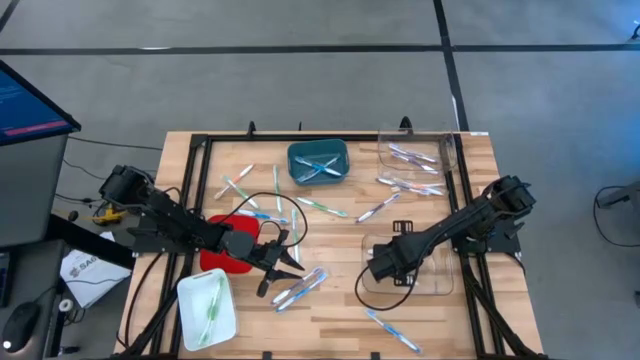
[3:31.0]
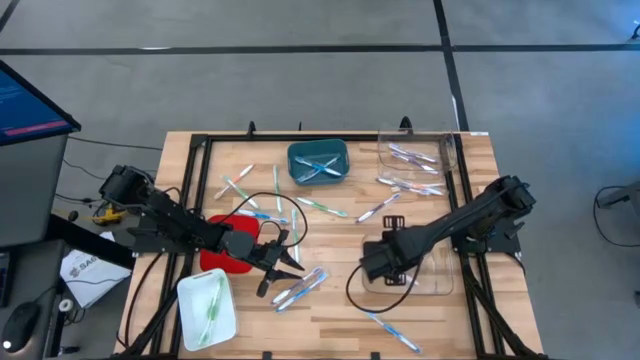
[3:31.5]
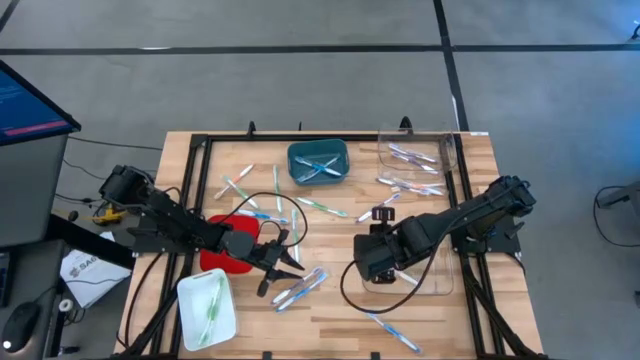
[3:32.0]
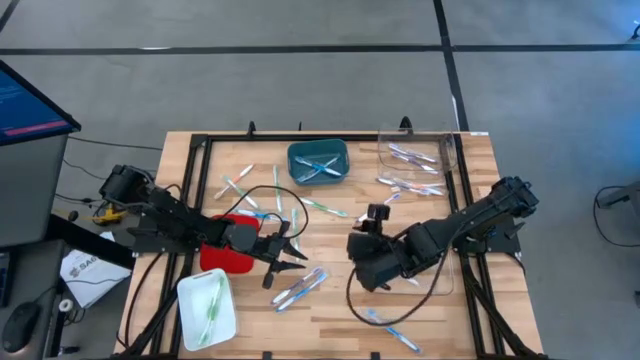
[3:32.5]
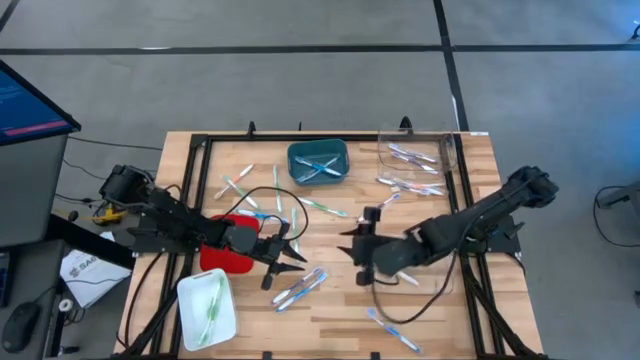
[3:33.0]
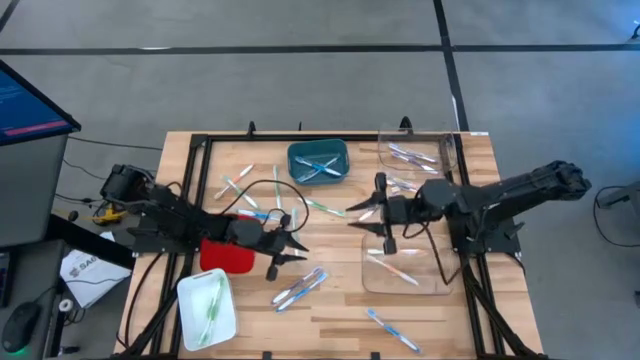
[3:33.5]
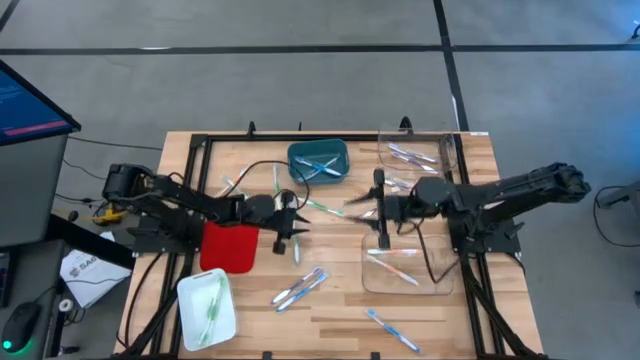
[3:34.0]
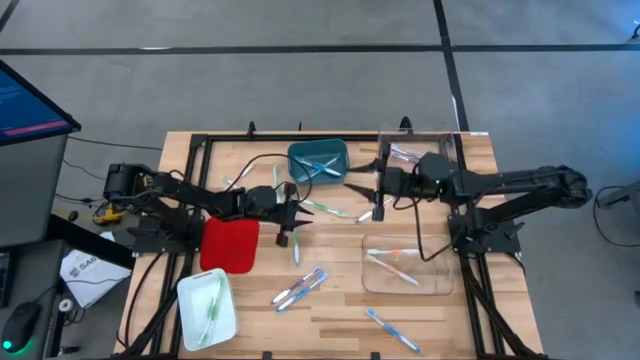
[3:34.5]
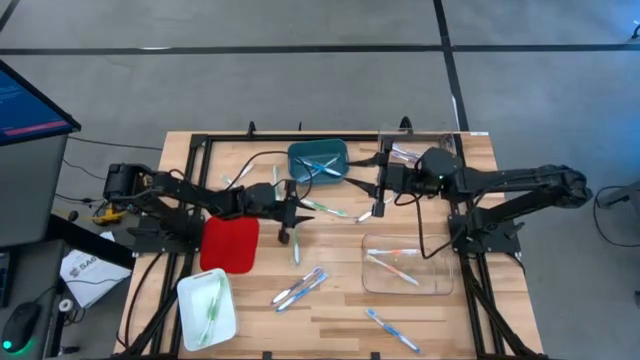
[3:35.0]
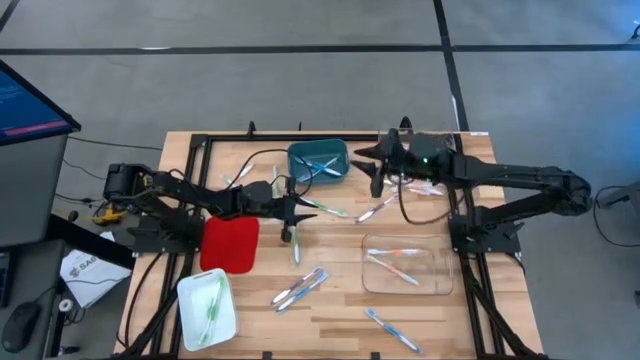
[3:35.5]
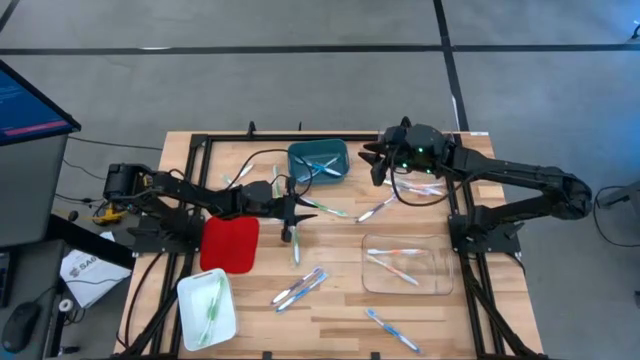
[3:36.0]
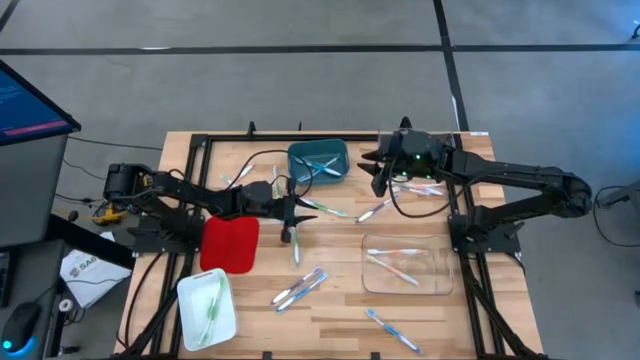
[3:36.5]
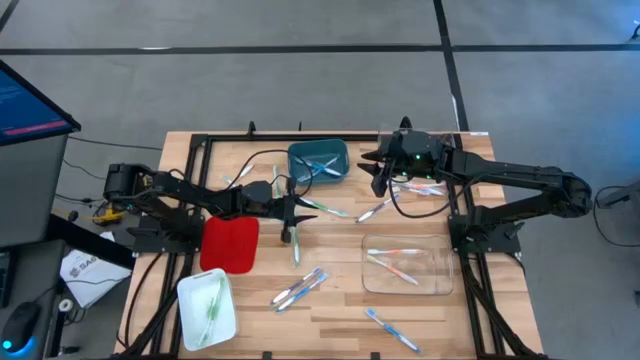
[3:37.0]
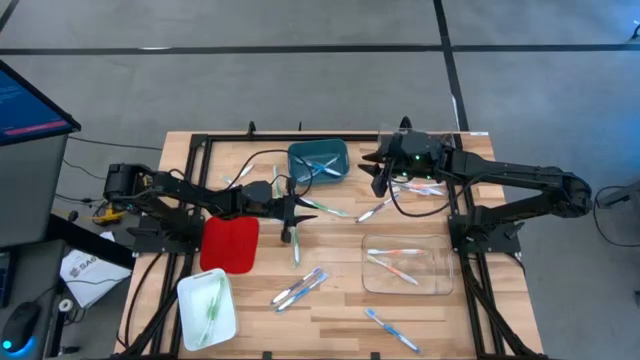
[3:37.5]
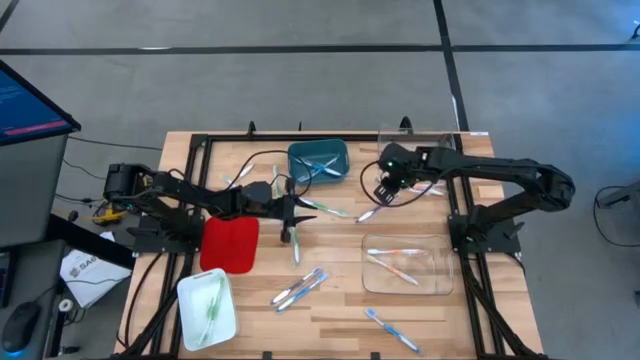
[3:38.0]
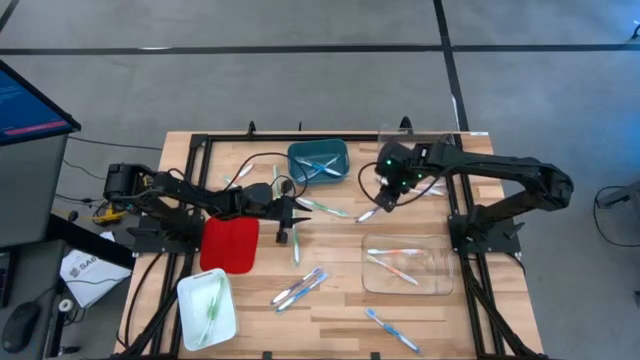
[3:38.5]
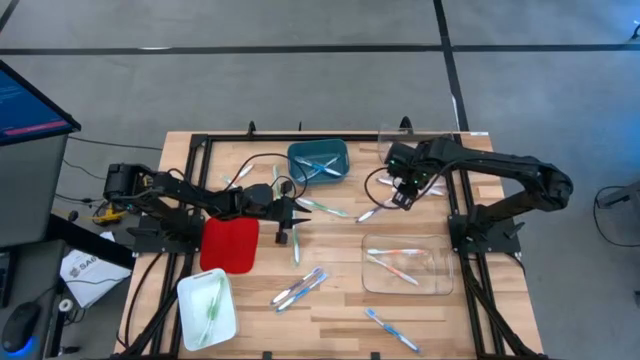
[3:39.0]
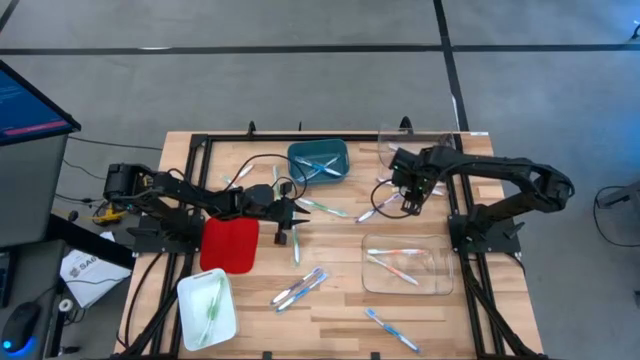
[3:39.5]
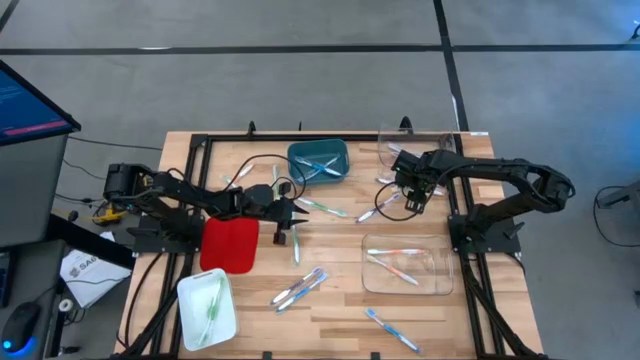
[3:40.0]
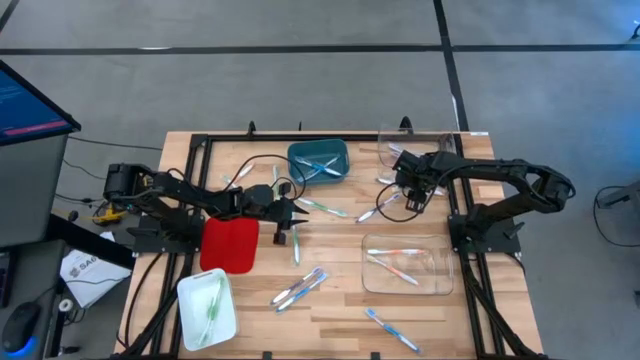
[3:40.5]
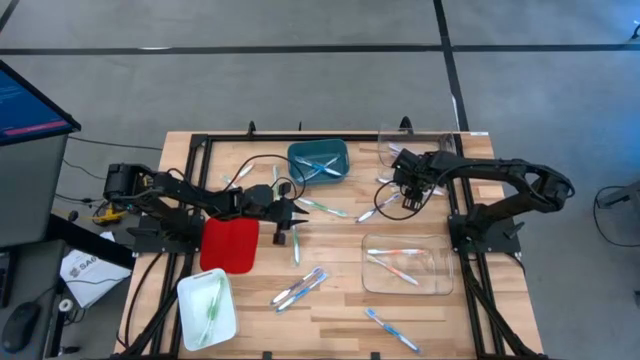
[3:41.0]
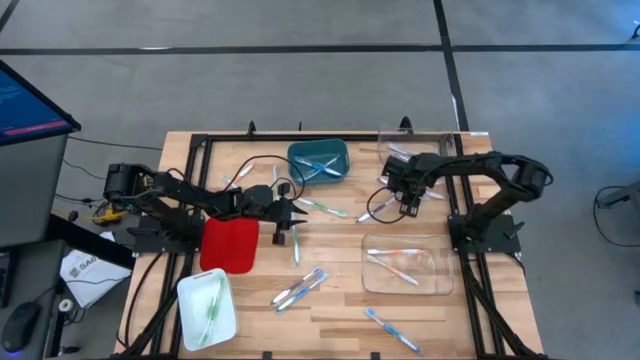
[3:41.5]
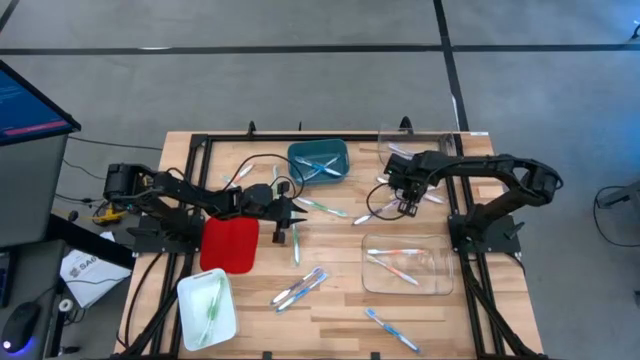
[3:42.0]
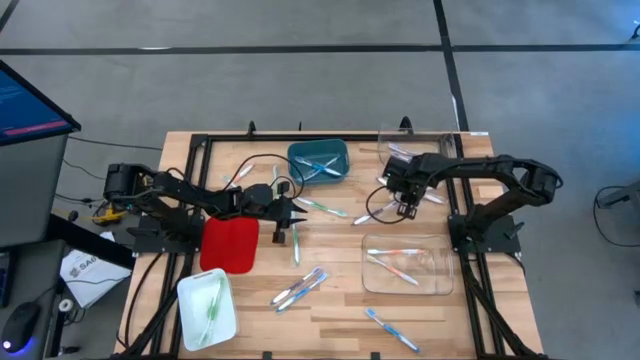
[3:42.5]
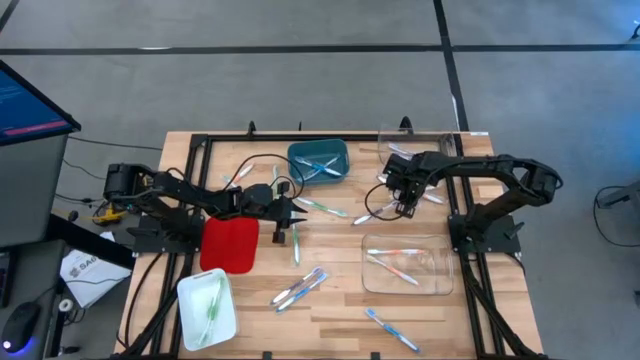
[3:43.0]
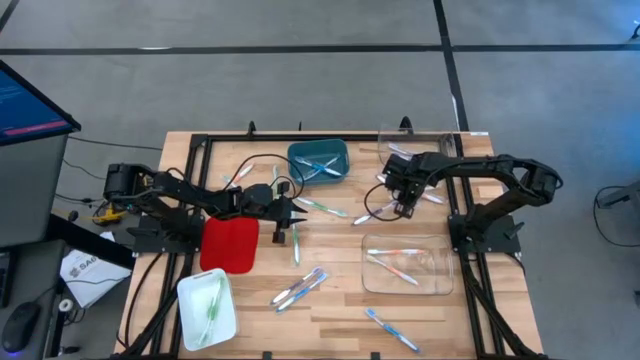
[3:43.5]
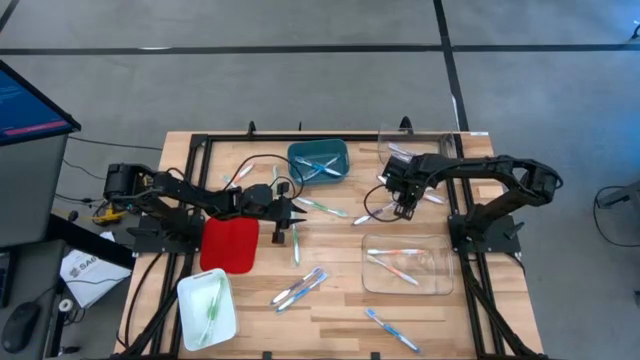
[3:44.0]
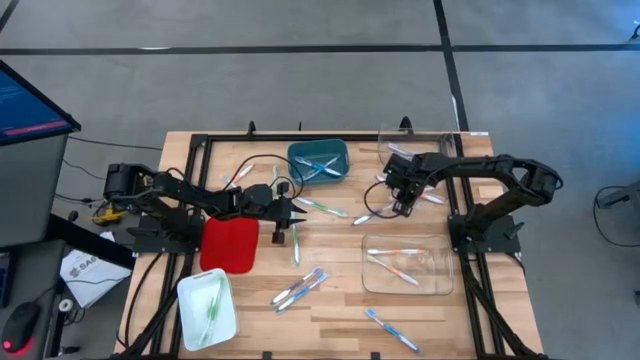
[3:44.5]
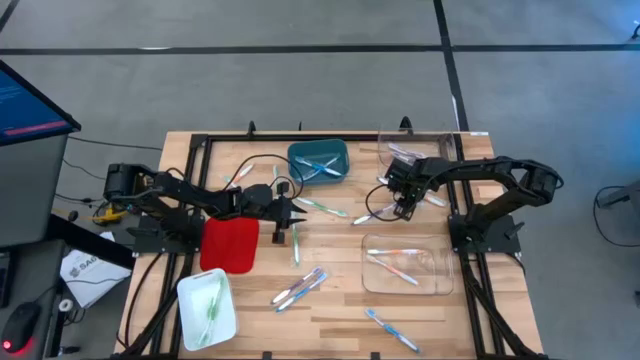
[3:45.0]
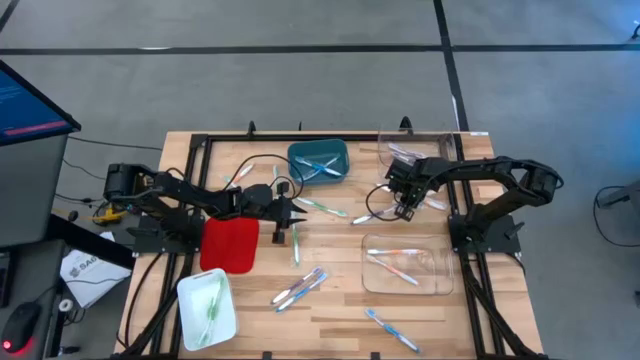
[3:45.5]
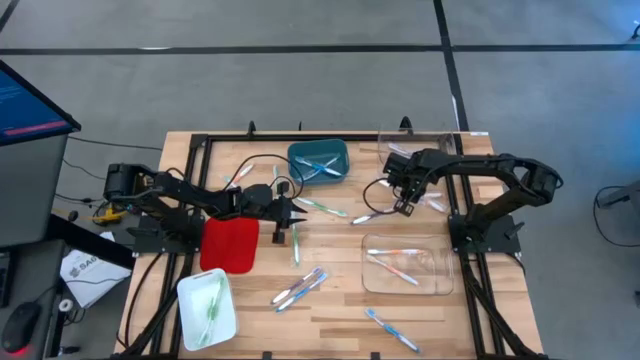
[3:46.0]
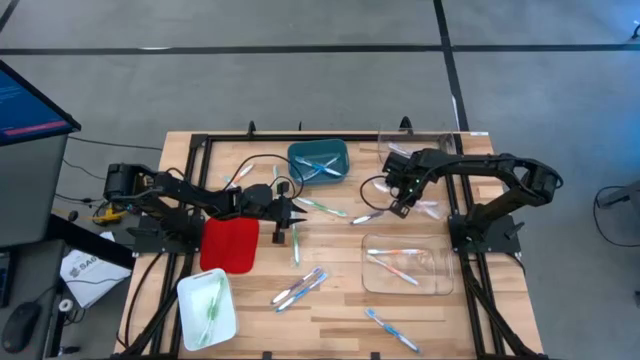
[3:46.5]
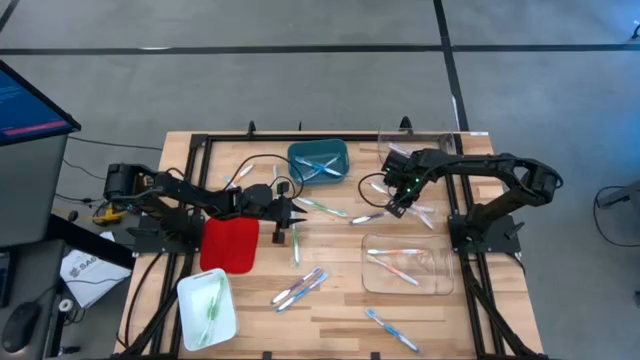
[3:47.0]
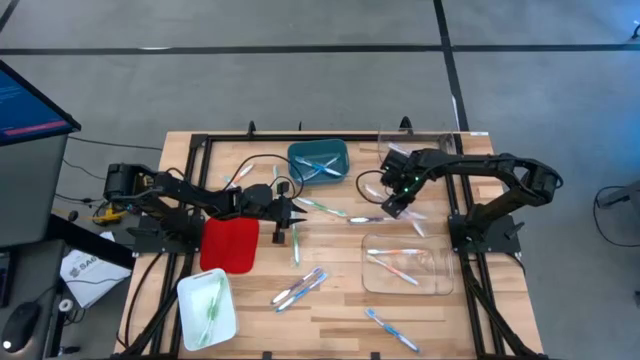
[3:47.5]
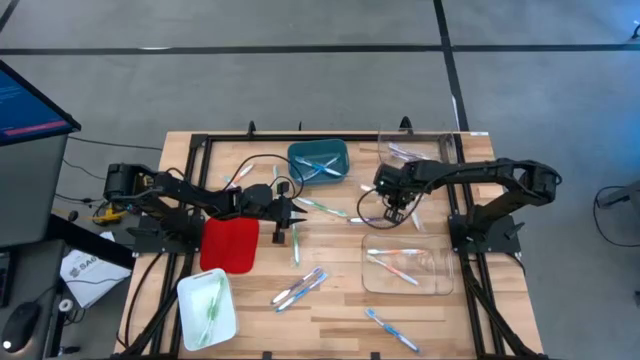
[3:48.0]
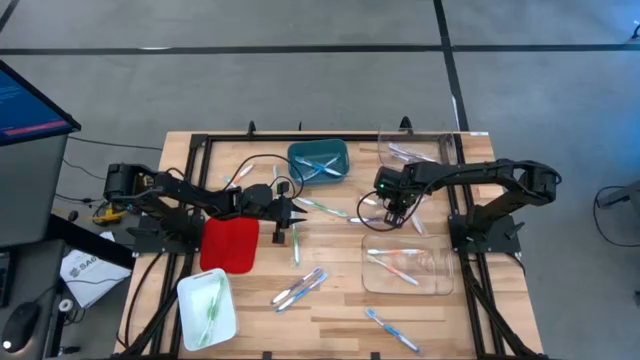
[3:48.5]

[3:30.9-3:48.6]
Task: Pick & Place Toothbrushes
Put the purple toothbrush into the top transparent bin

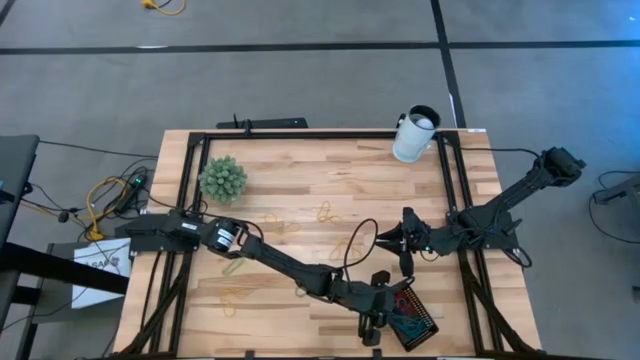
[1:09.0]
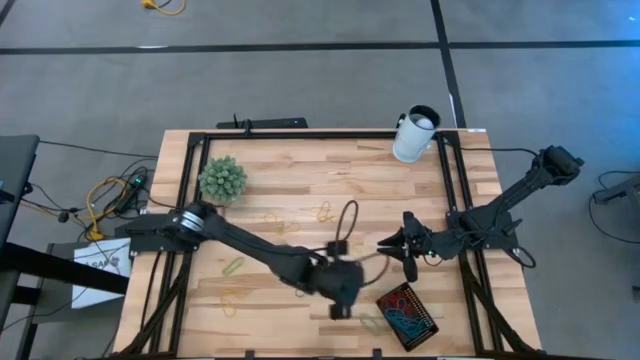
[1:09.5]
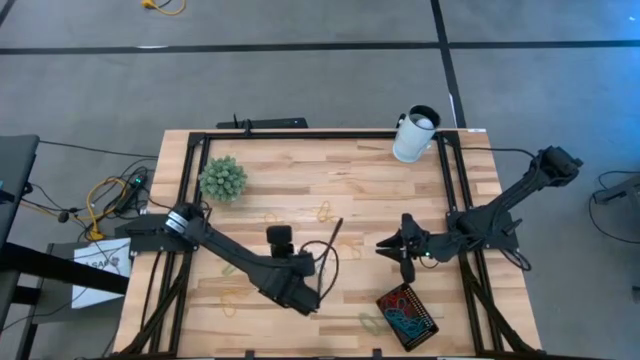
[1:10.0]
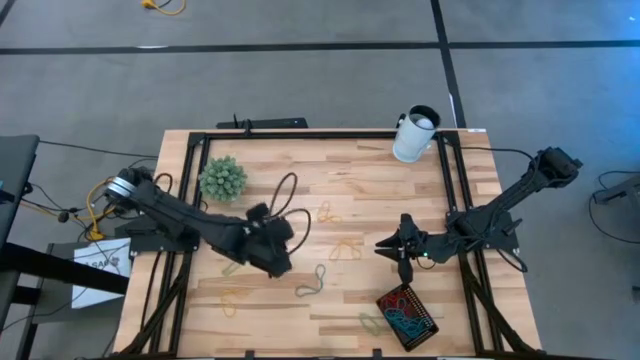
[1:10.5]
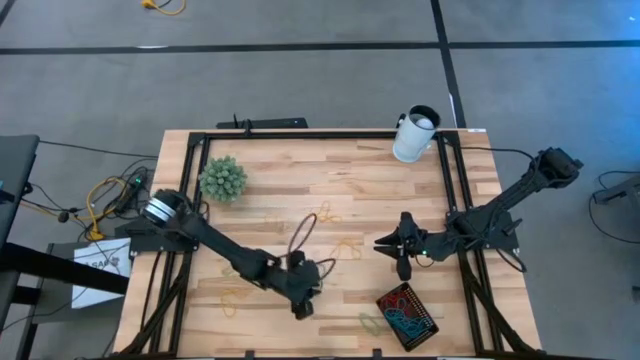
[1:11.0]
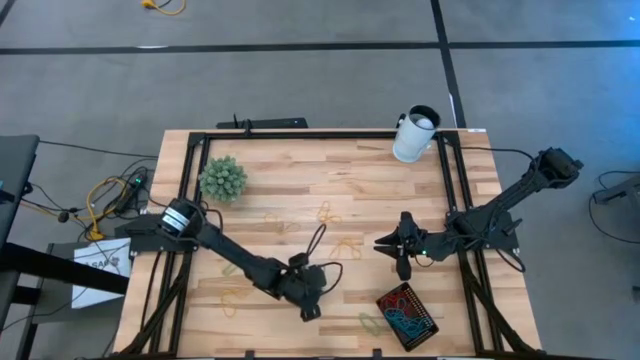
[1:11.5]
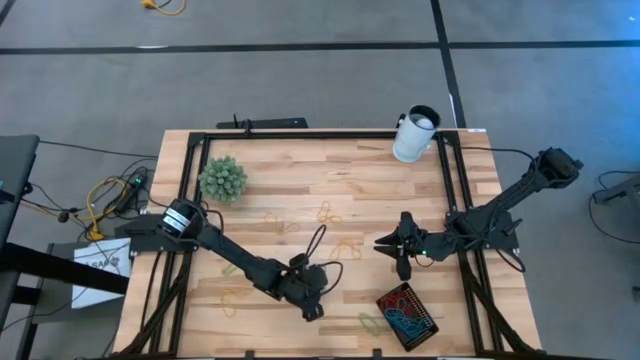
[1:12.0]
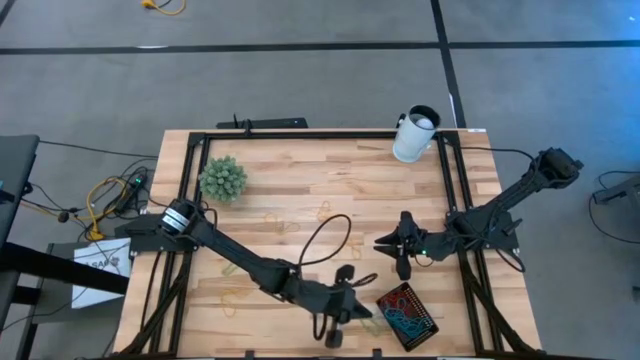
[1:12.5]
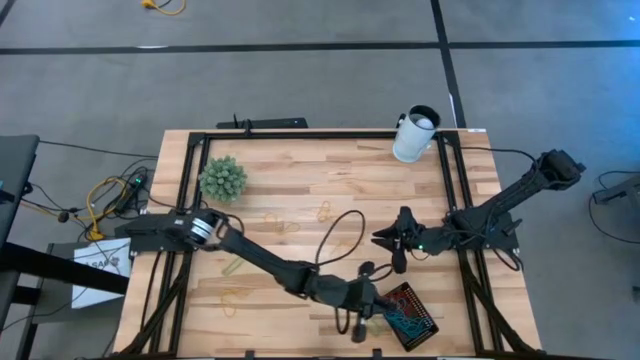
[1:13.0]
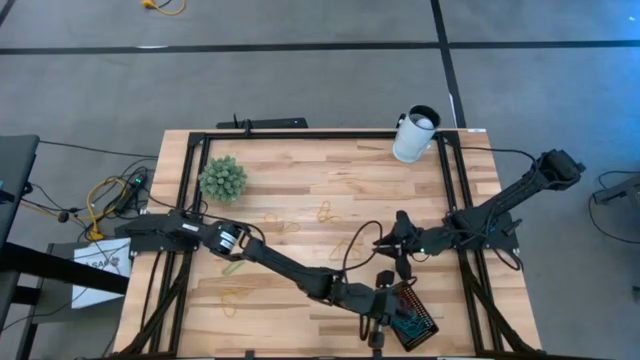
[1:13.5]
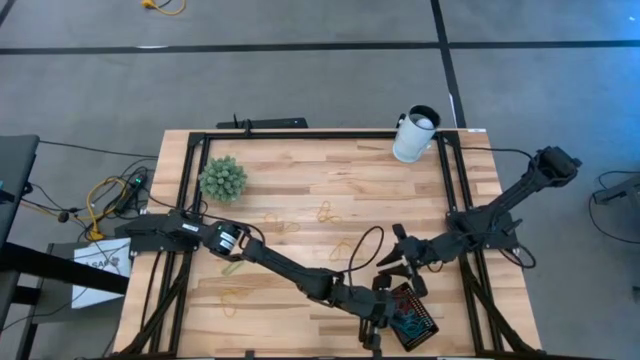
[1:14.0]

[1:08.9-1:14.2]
Task: Pick and place rubber bands into bin
Put the blue rubber band into the black basket
